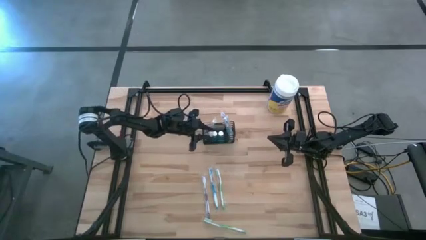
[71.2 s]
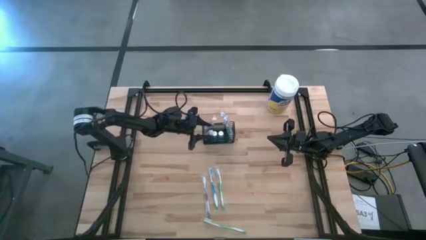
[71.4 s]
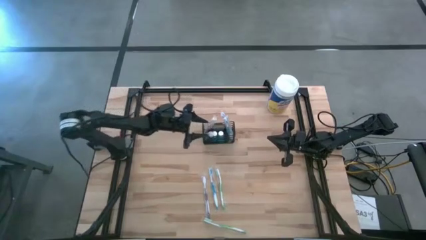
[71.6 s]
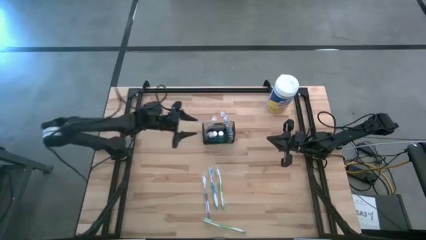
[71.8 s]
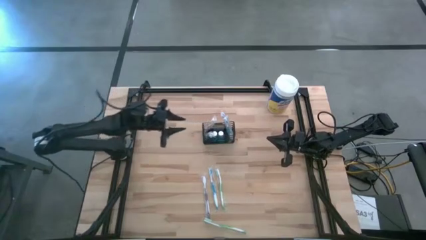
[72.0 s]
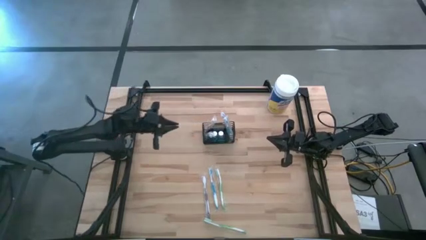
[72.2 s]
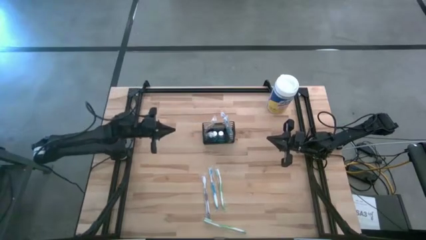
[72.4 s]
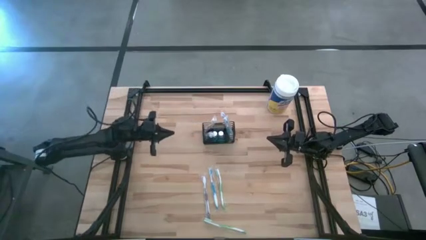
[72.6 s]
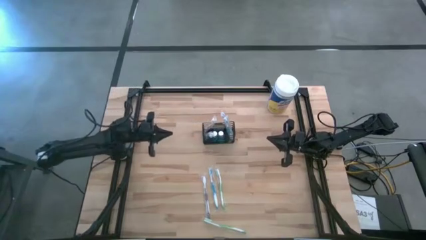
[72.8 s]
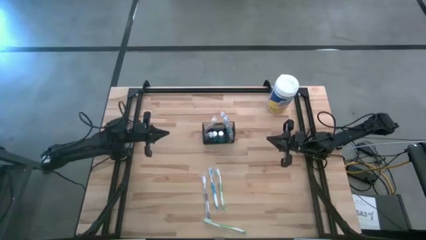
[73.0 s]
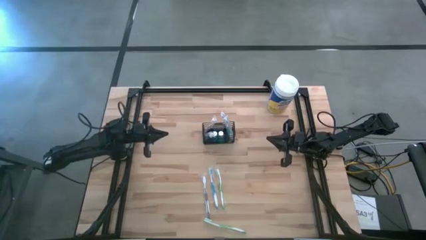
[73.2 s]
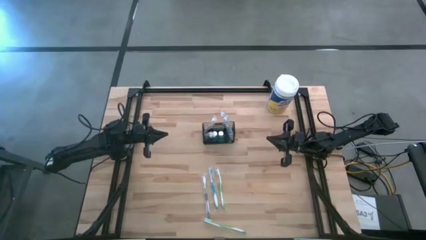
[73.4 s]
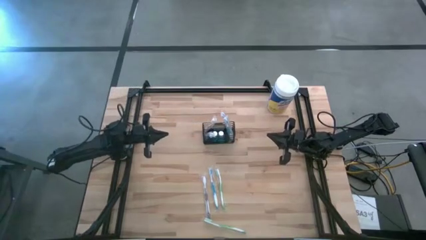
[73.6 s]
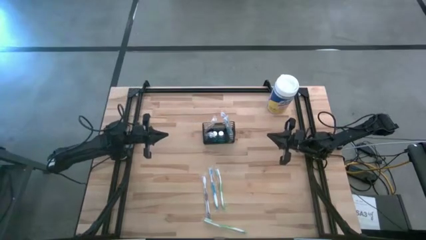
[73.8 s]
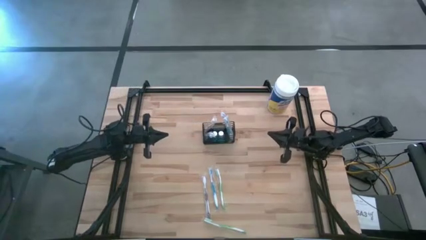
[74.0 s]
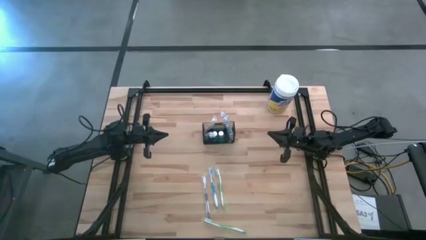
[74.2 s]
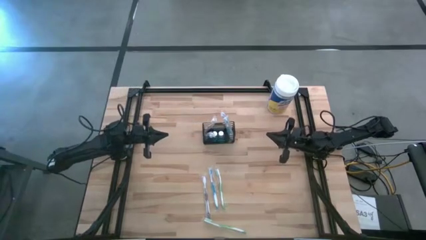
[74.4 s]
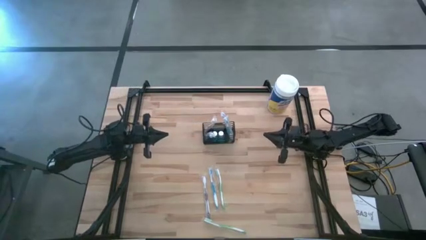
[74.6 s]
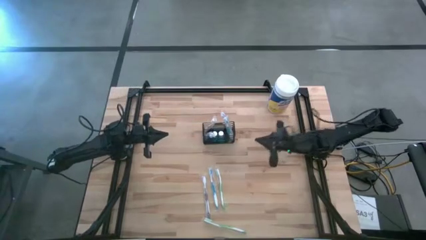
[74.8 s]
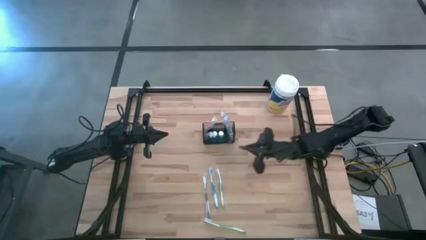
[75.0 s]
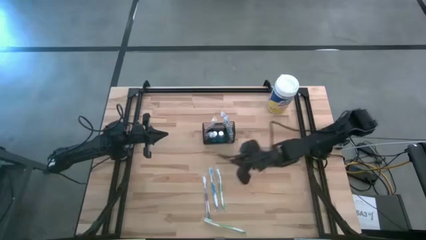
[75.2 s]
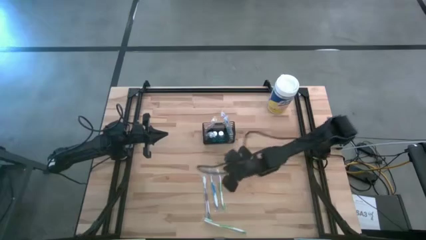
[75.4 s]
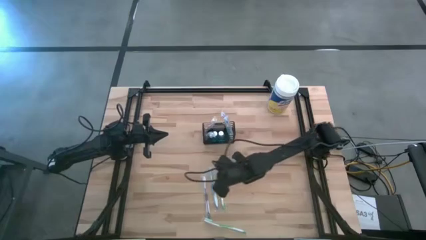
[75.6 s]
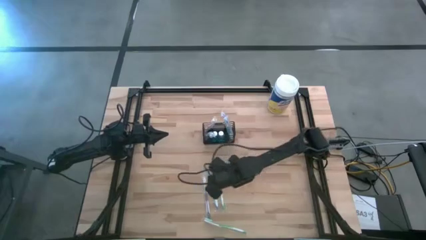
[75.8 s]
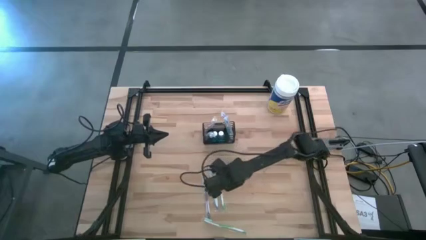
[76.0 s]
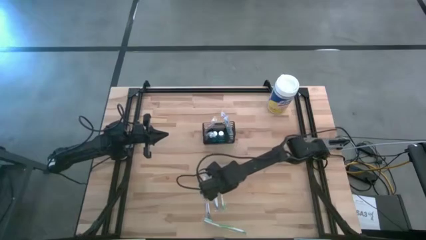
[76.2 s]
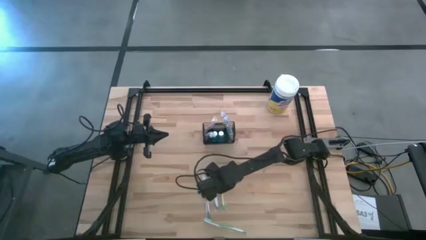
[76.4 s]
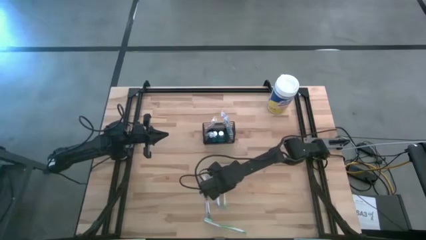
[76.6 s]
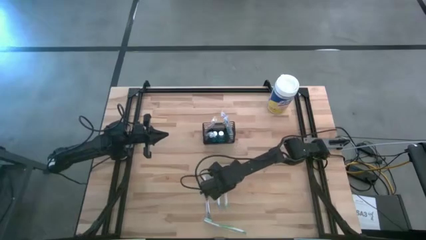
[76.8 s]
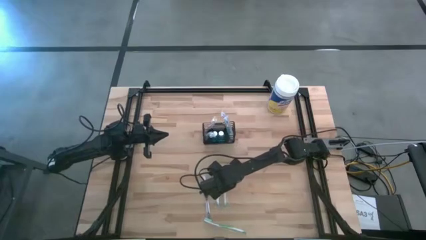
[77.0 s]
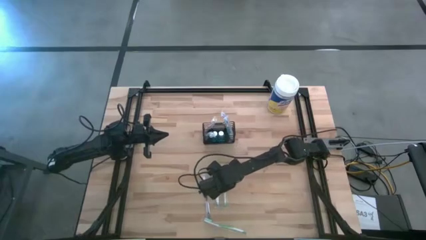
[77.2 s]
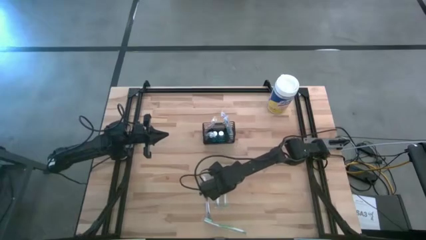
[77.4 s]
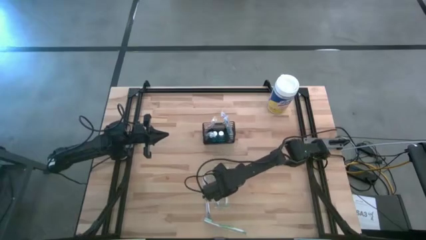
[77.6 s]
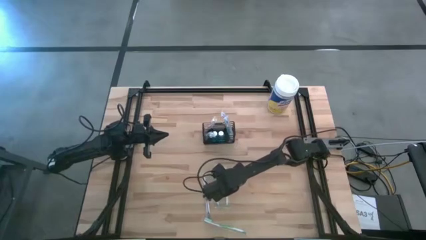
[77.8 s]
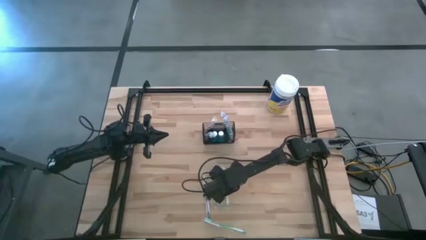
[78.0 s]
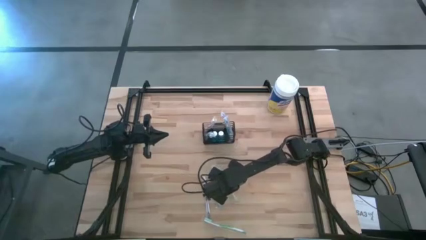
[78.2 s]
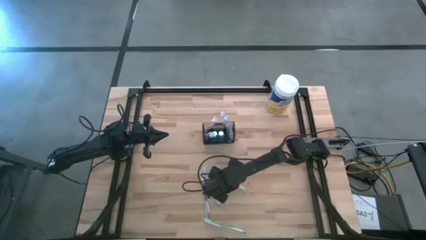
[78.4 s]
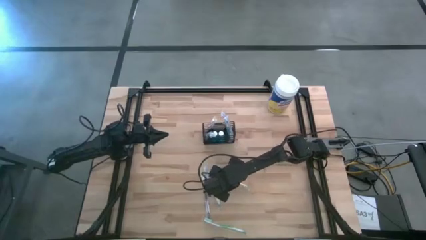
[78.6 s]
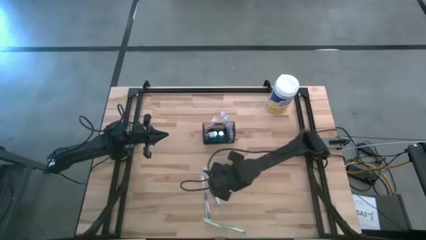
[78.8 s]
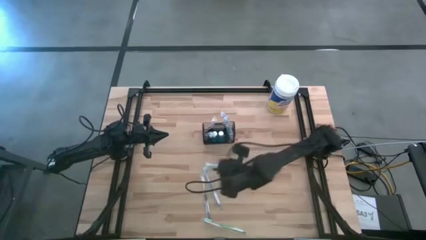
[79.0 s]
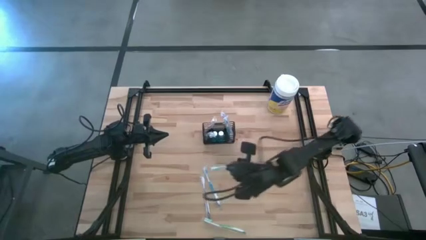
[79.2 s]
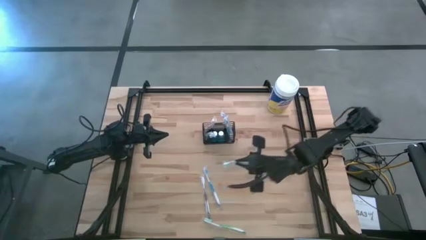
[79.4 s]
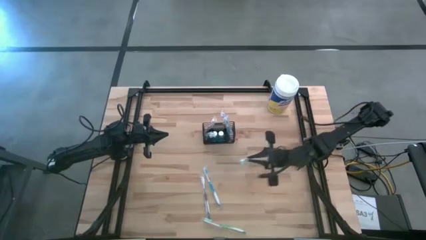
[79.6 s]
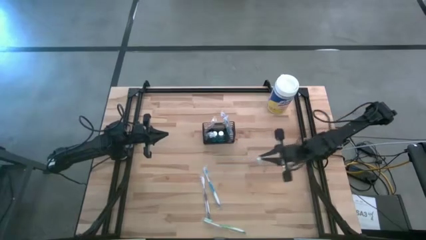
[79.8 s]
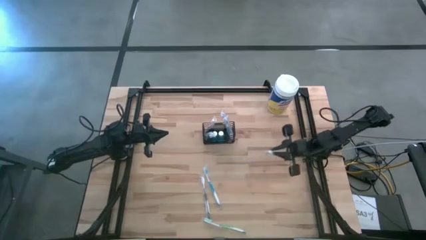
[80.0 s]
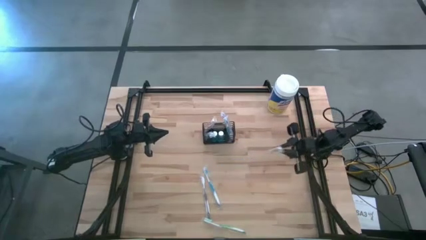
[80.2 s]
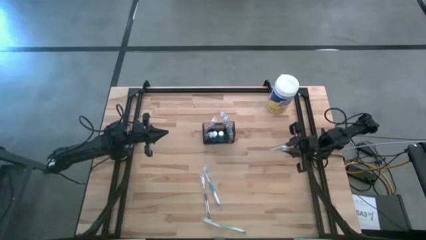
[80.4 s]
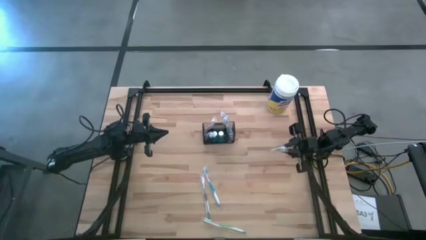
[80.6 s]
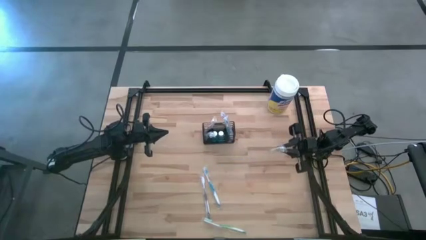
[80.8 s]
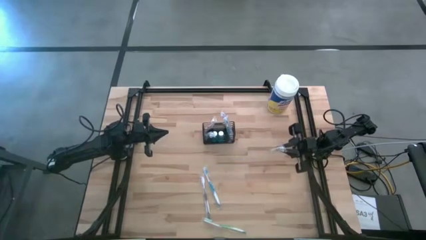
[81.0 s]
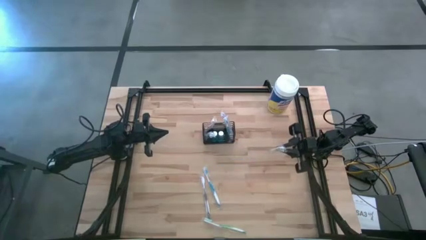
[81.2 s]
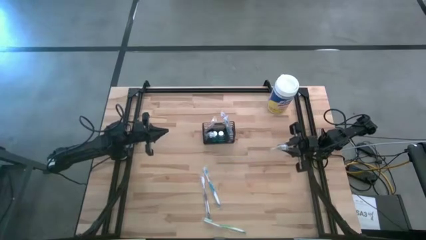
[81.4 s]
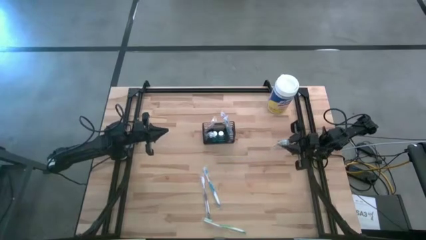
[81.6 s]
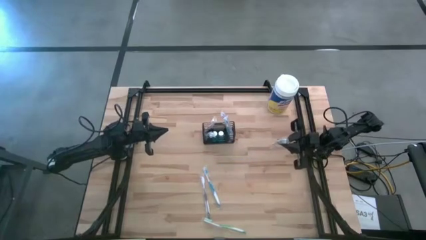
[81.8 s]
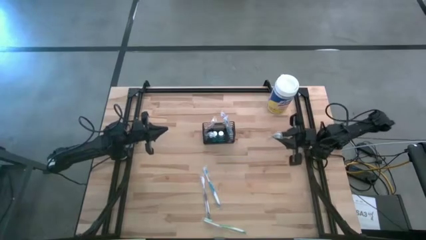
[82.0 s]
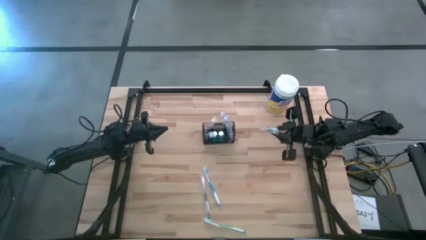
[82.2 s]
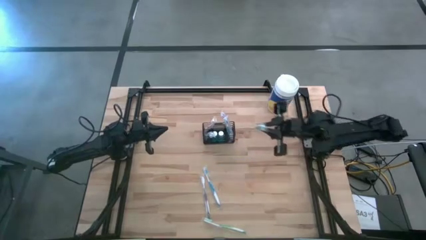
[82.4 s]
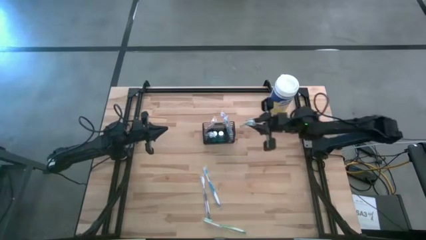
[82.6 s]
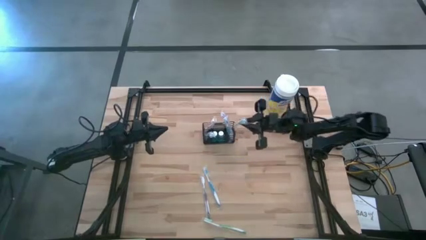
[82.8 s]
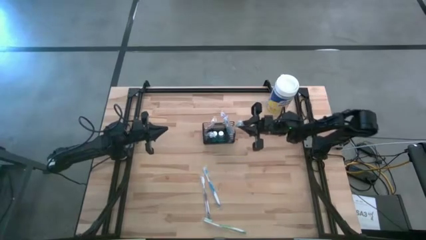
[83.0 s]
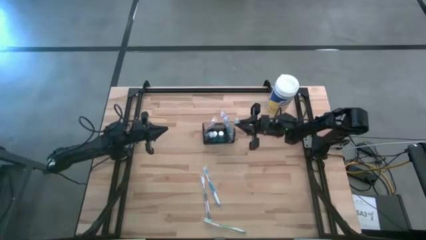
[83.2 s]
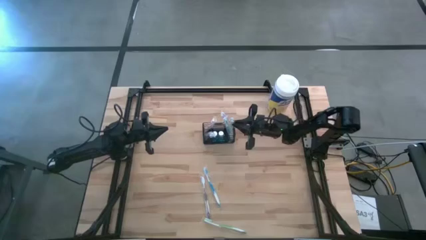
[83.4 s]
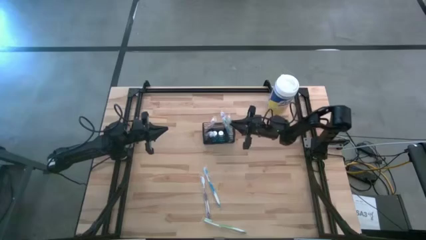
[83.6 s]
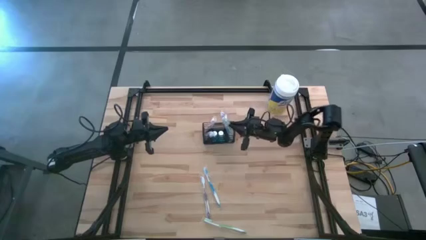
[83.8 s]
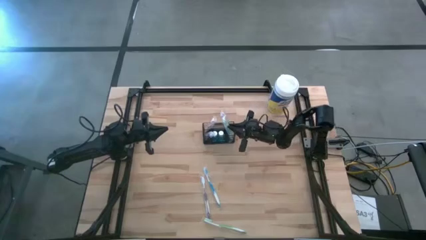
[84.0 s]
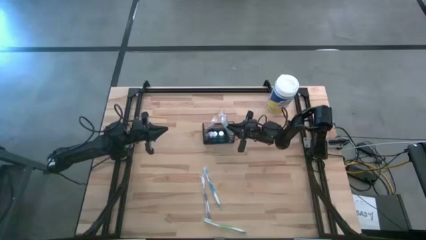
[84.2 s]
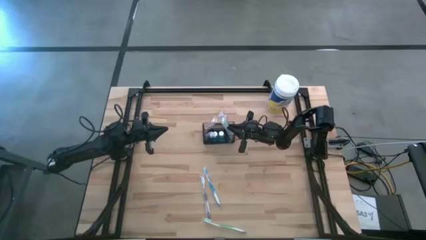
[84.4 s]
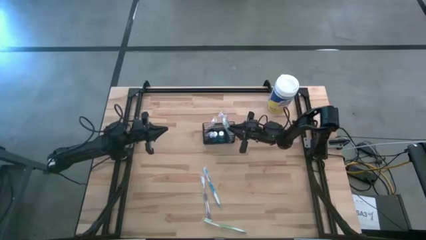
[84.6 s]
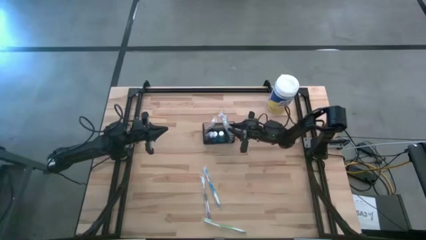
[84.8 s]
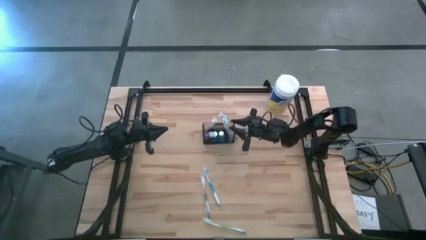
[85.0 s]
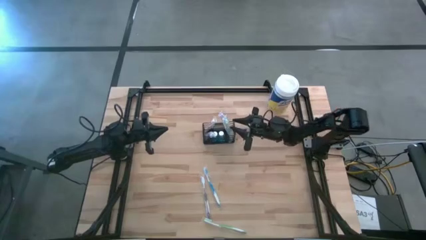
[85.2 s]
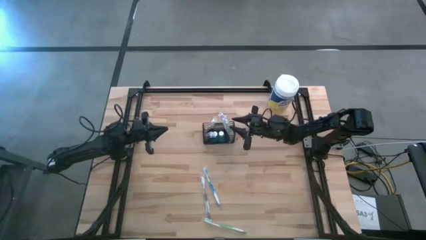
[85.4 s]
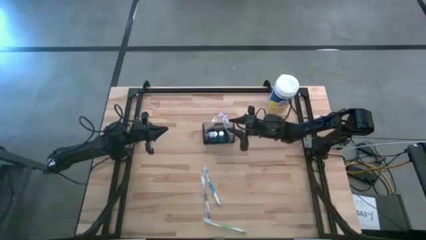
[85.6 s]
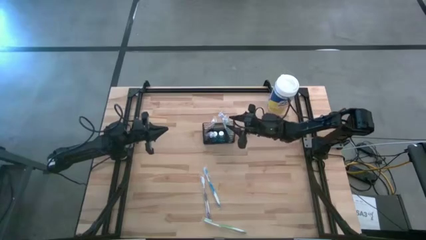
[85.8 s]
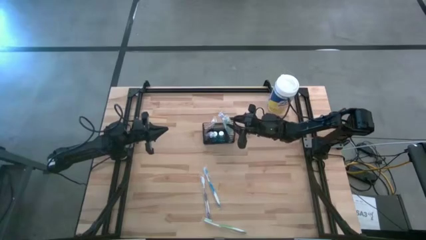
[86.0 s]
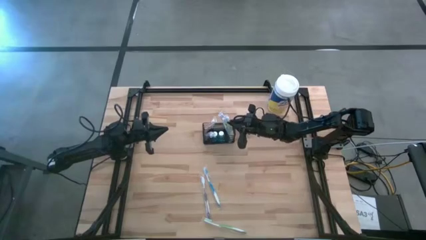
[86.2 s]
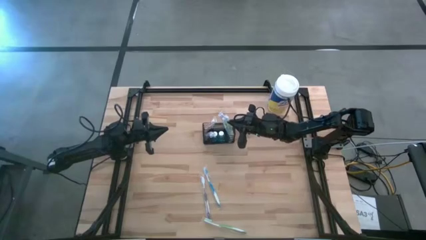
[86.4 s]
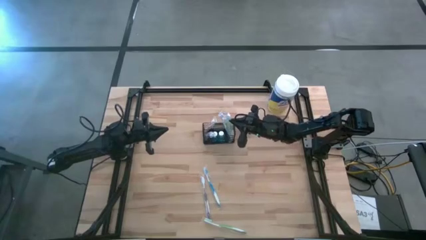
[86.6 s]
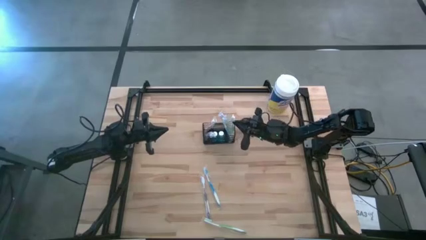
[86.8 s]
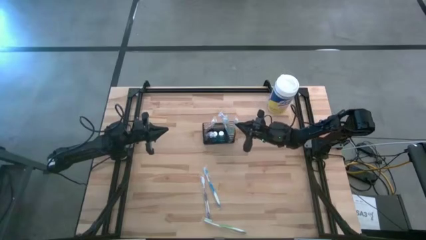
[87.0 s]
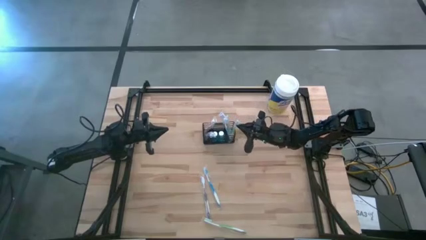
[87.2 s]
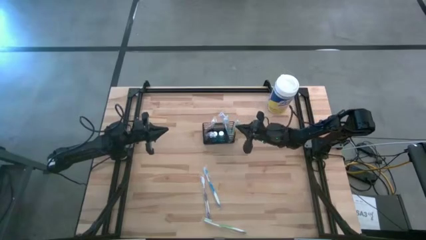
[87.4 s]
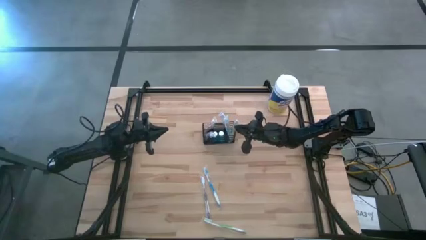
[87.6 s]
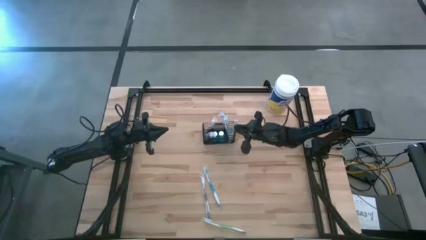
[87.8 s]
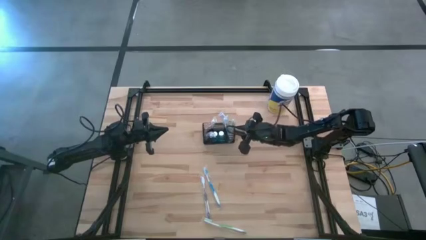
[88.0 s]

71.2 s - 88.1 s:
Task: Pick & Place toothbrushing station
Put the top green toothbrush into the mesh organizer
